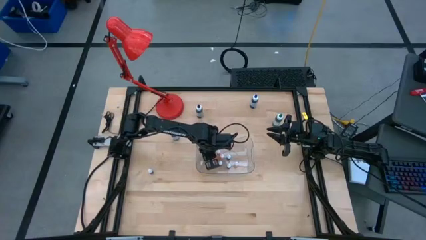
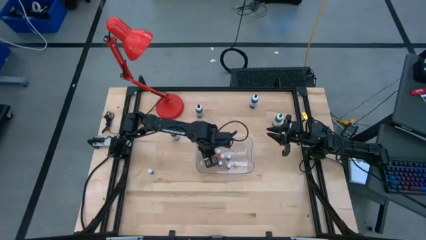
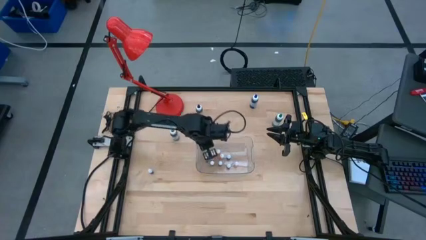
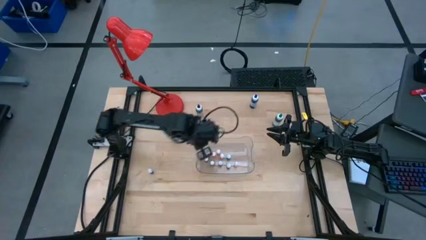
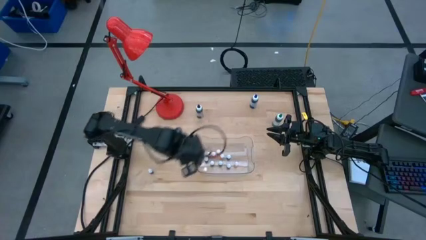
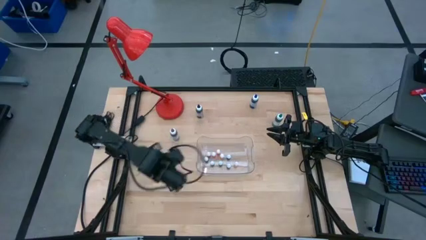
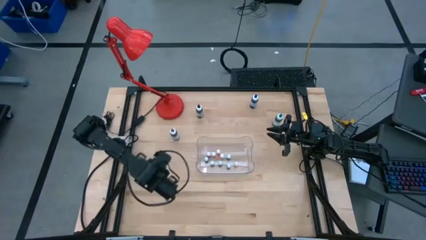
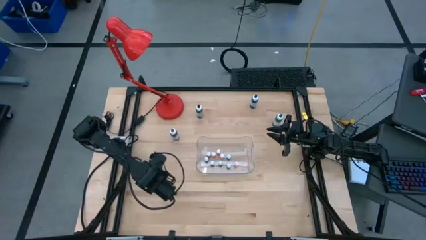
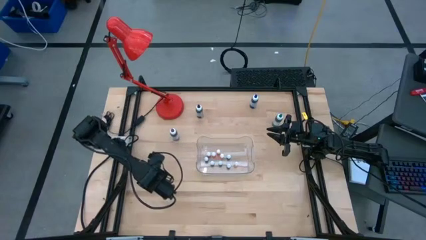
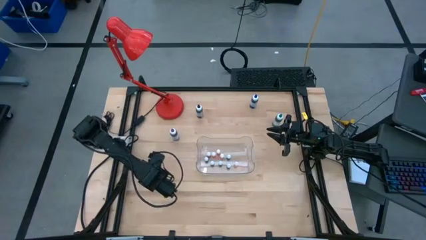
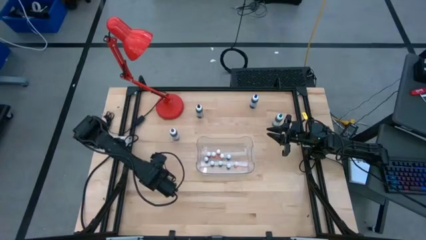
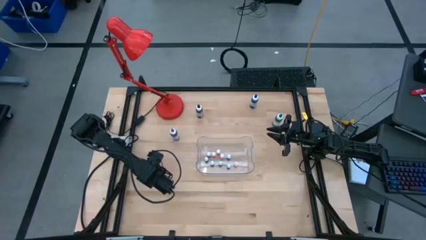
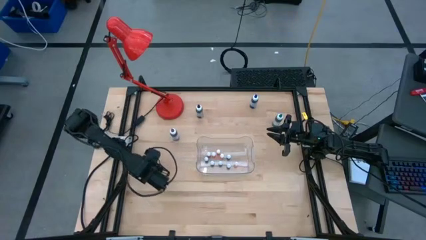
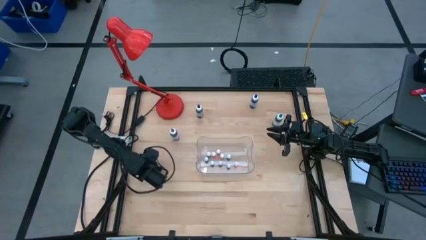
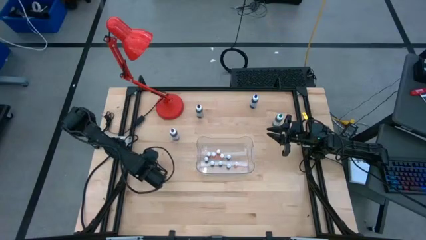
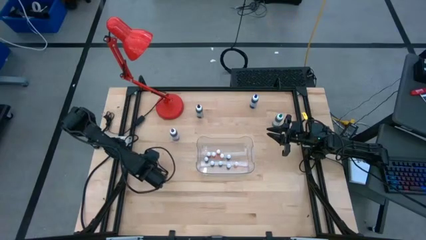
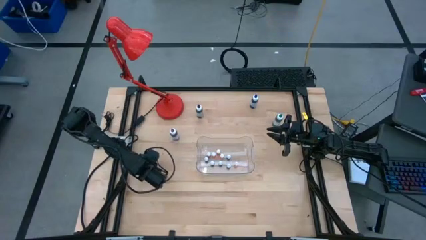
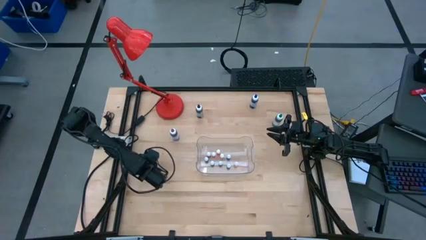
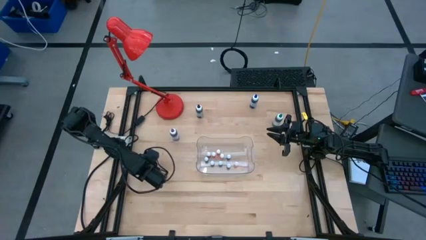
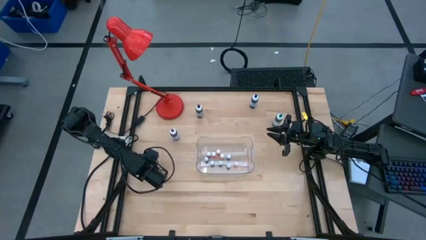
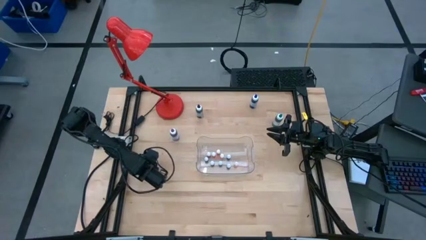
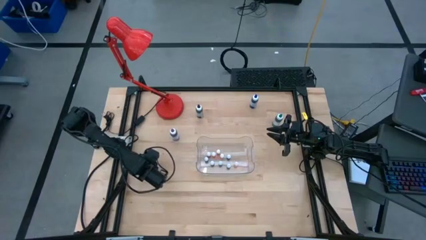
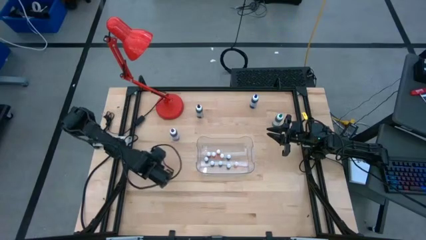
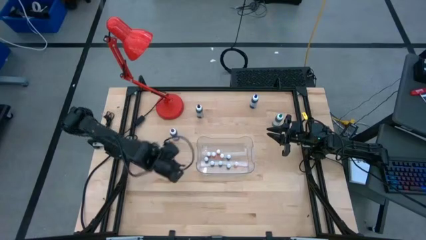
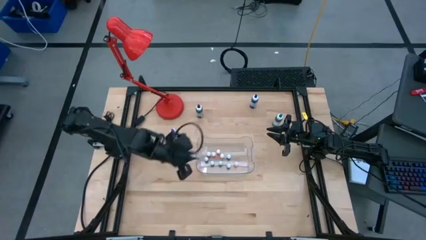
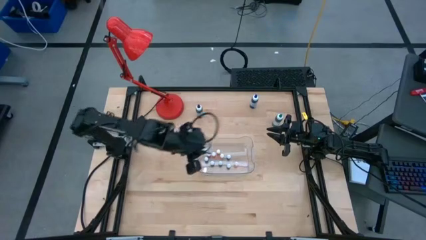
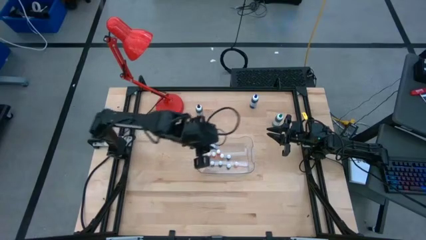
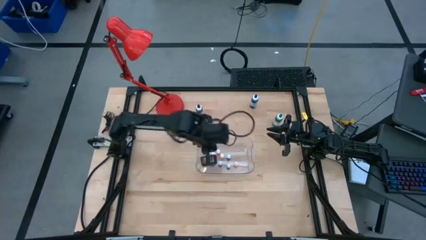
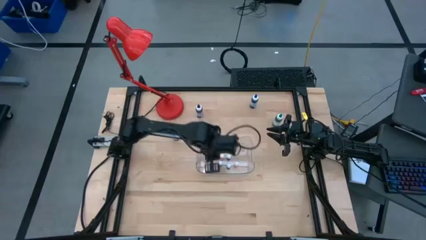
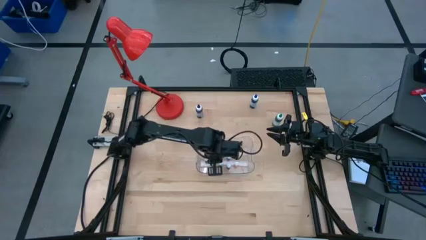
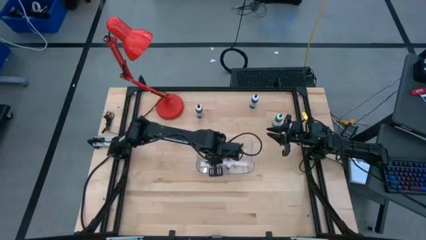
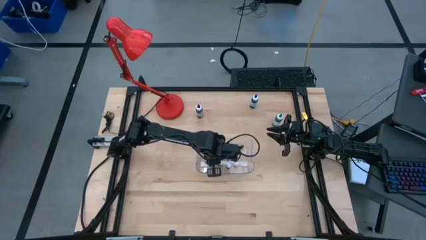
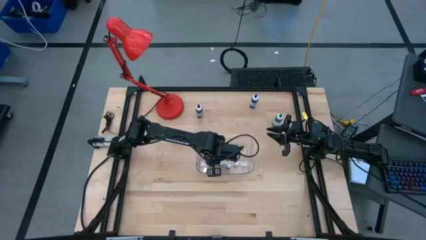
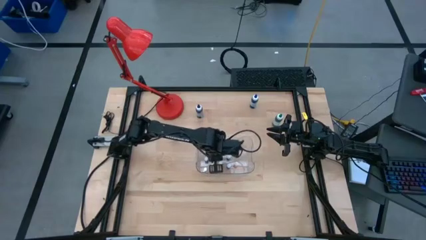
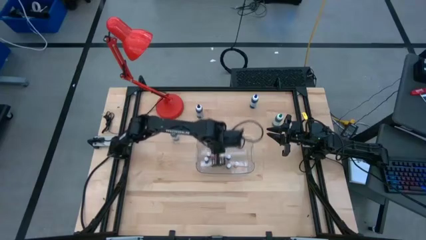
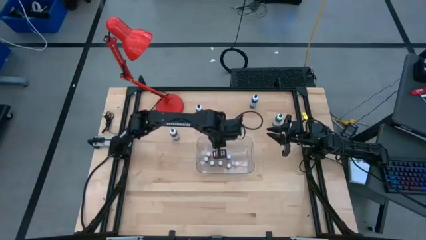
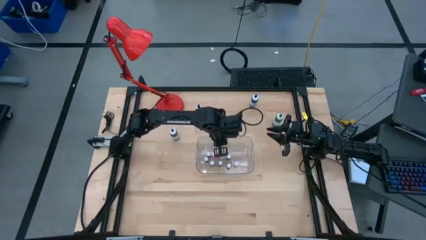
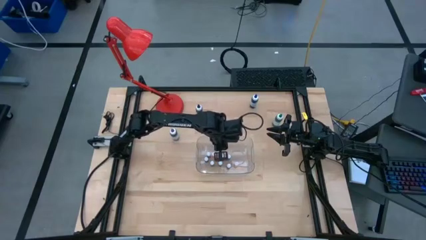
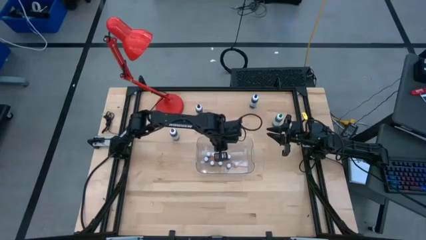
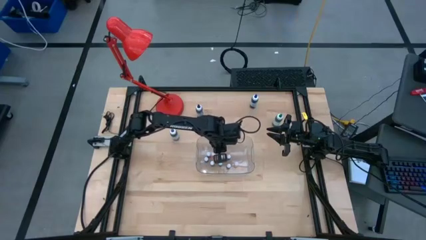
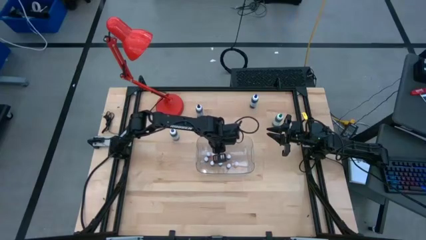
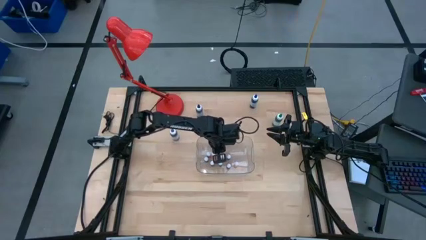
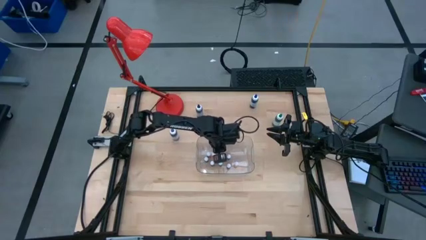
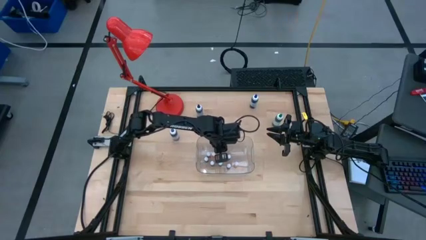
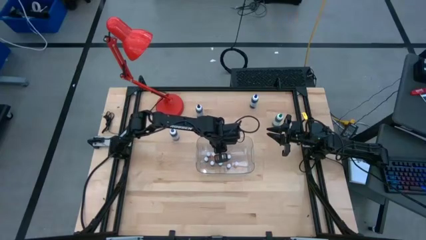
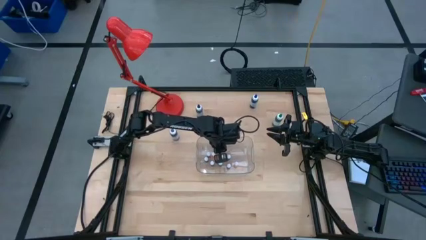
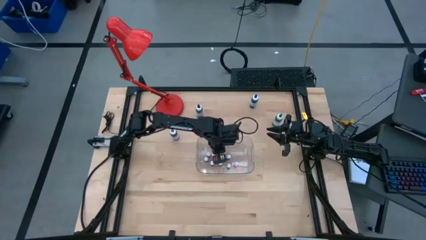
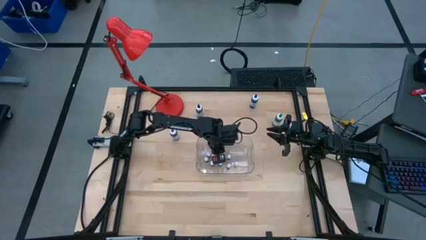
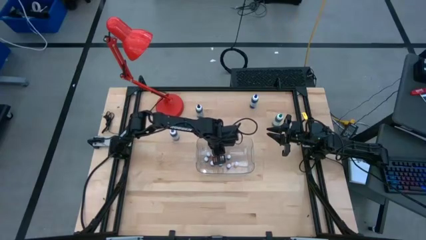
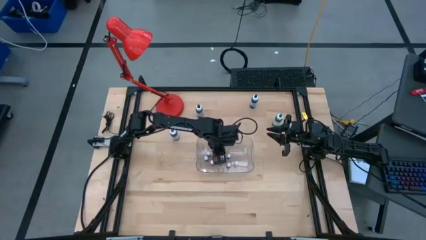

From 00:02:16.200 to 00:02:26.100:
Task: Pick & Place food coloring
Put the small blue food coloring bottle into the transparent bin
